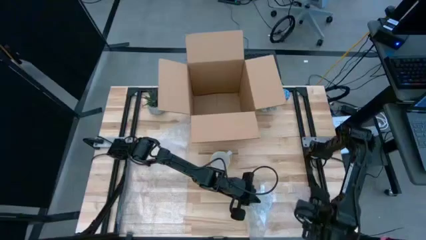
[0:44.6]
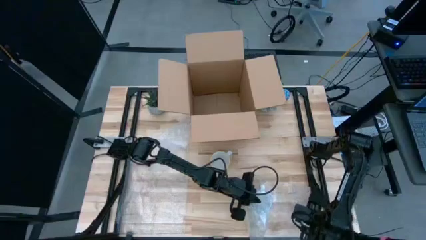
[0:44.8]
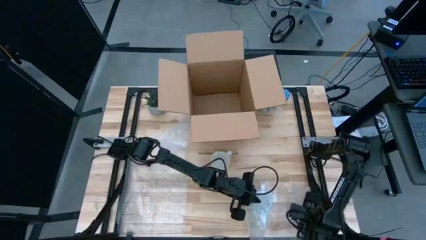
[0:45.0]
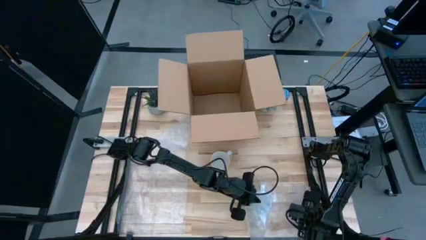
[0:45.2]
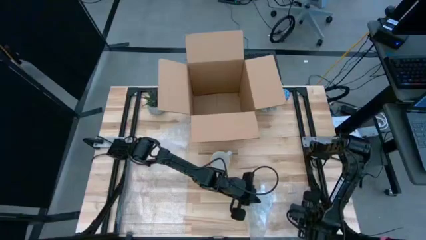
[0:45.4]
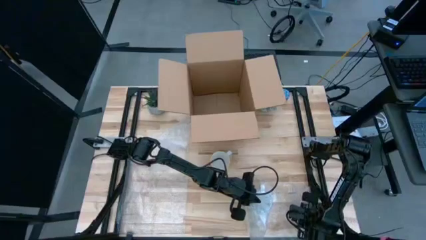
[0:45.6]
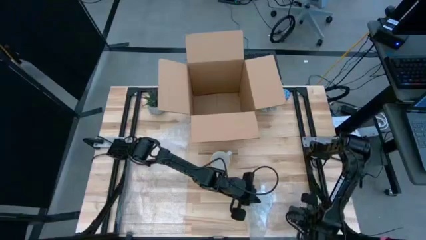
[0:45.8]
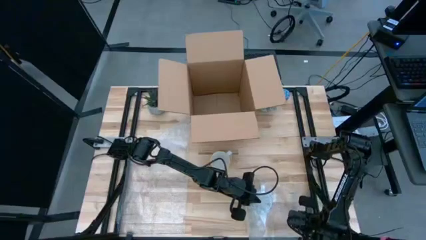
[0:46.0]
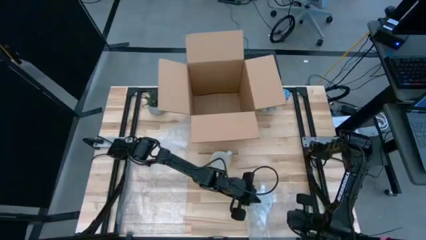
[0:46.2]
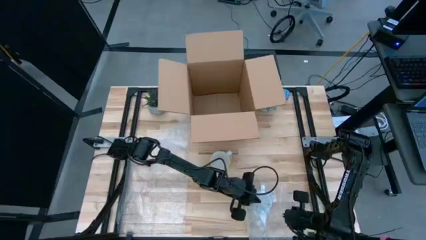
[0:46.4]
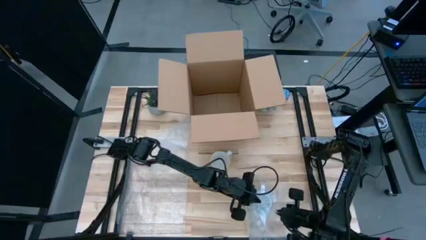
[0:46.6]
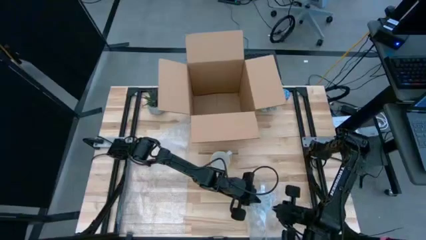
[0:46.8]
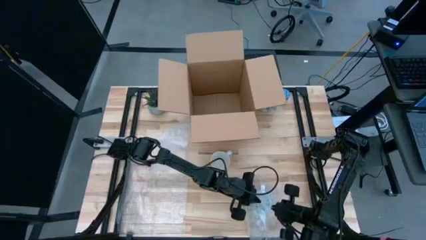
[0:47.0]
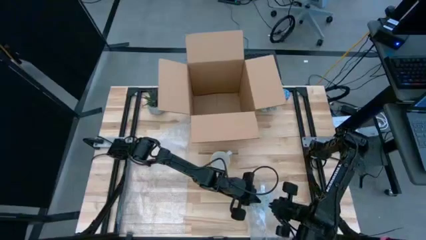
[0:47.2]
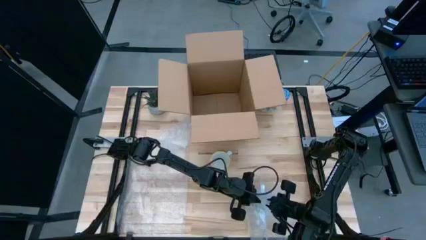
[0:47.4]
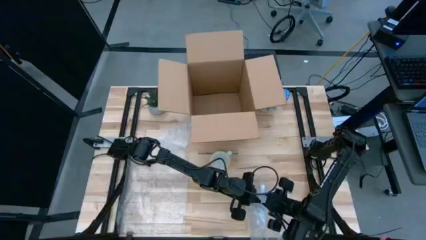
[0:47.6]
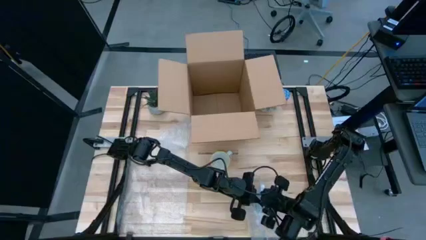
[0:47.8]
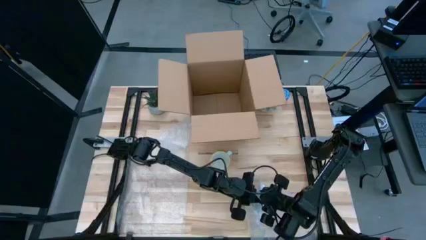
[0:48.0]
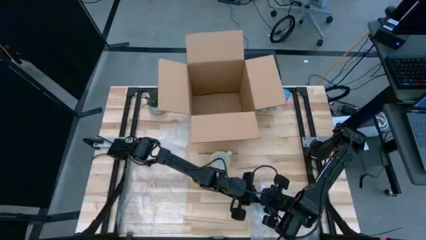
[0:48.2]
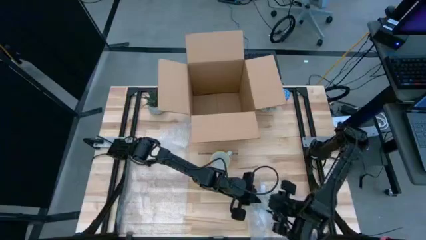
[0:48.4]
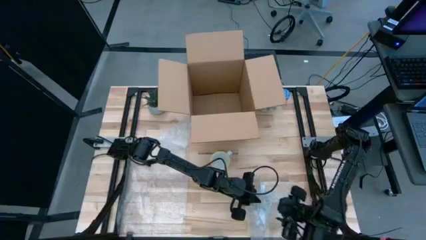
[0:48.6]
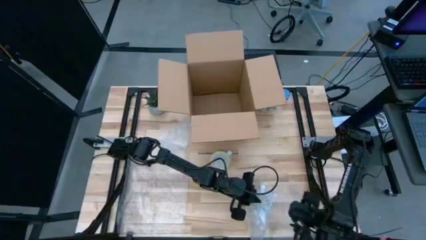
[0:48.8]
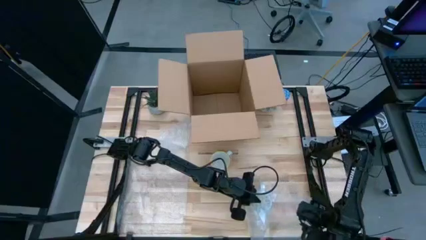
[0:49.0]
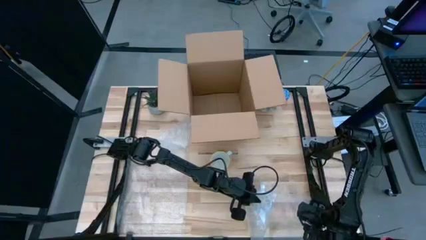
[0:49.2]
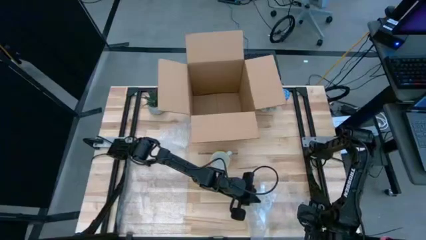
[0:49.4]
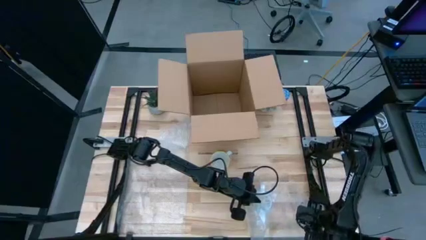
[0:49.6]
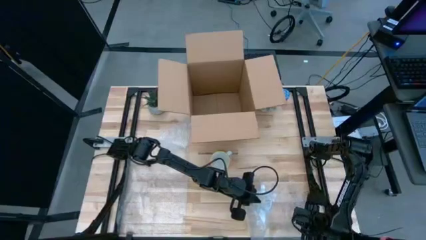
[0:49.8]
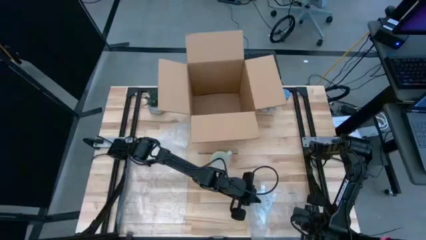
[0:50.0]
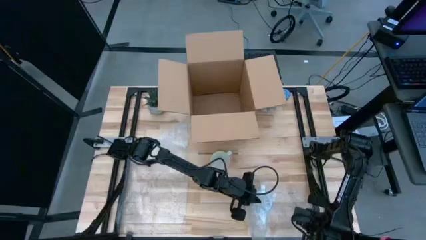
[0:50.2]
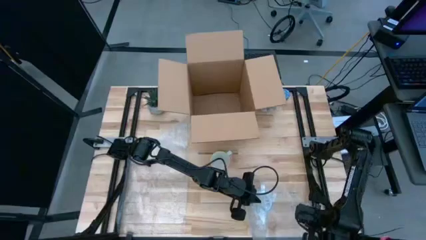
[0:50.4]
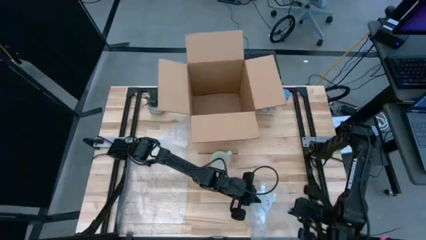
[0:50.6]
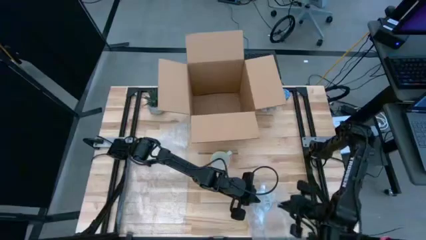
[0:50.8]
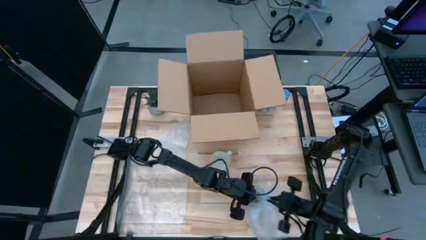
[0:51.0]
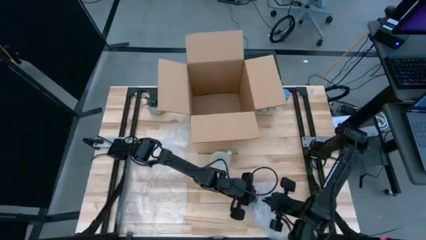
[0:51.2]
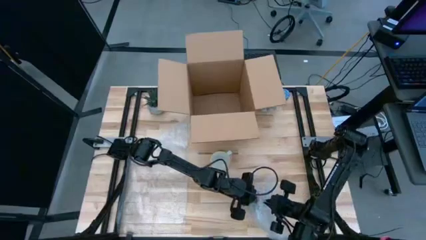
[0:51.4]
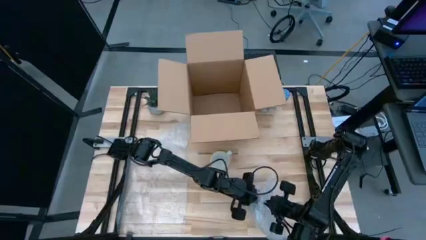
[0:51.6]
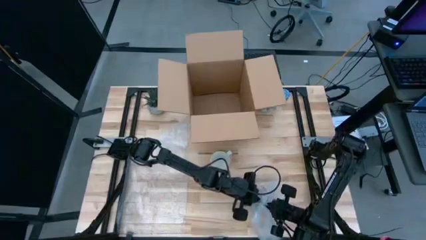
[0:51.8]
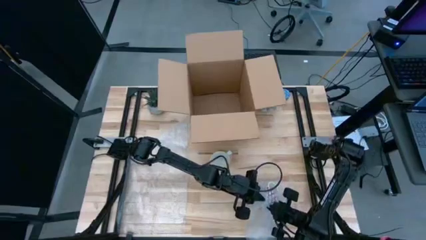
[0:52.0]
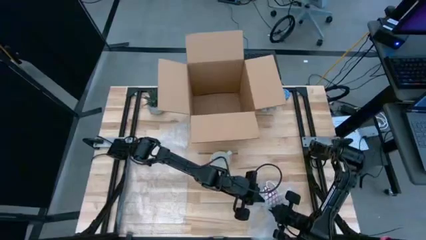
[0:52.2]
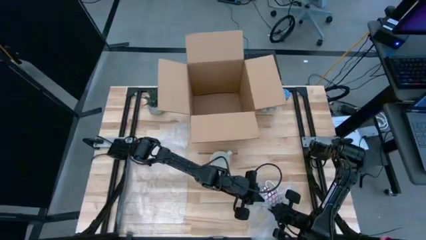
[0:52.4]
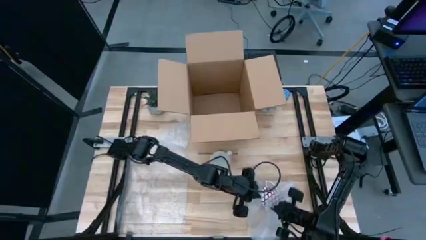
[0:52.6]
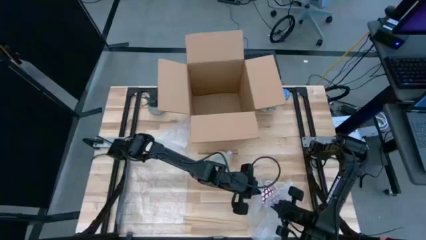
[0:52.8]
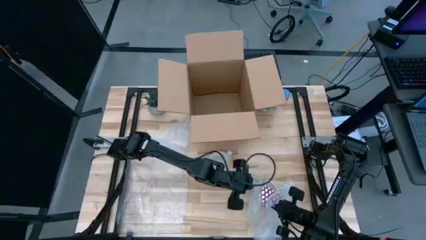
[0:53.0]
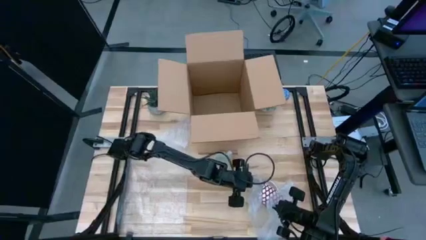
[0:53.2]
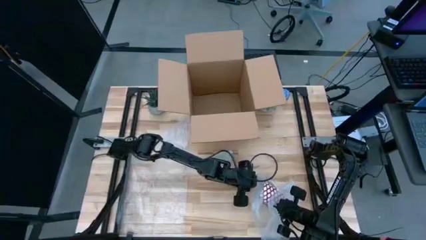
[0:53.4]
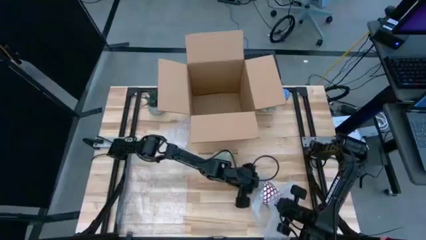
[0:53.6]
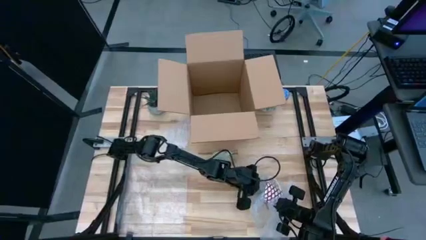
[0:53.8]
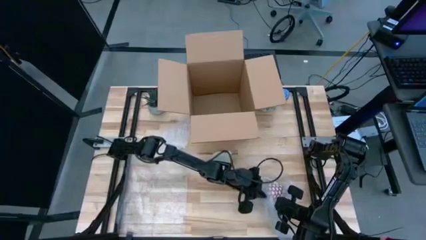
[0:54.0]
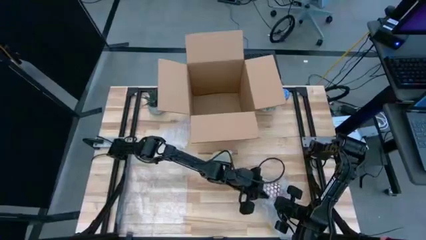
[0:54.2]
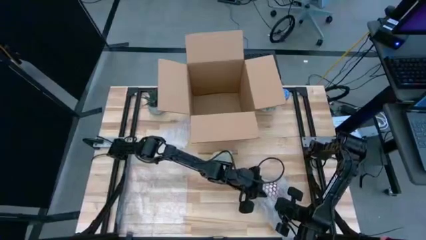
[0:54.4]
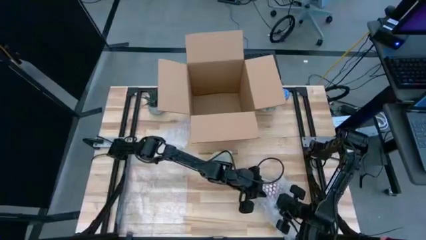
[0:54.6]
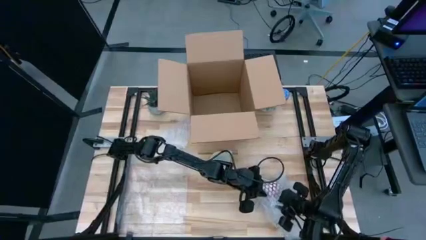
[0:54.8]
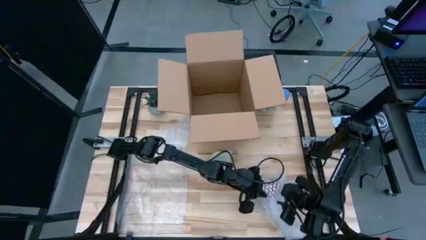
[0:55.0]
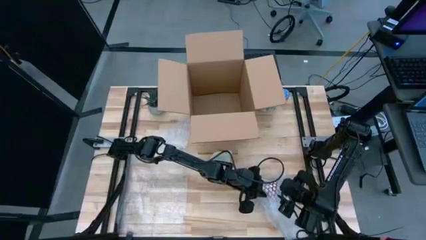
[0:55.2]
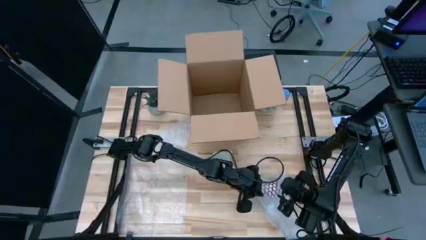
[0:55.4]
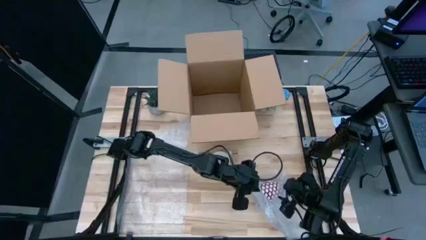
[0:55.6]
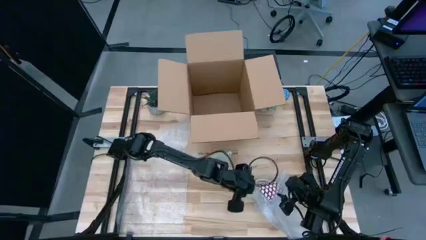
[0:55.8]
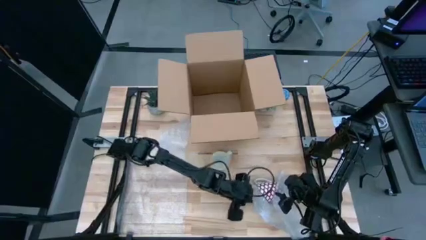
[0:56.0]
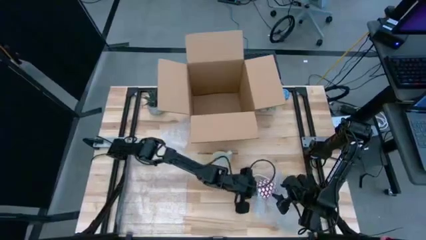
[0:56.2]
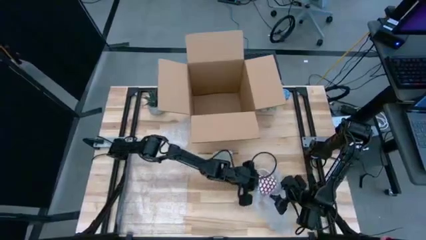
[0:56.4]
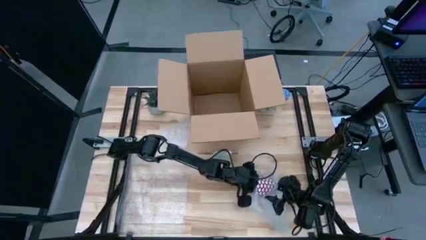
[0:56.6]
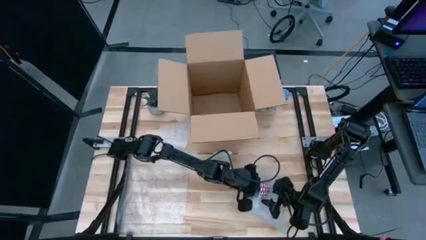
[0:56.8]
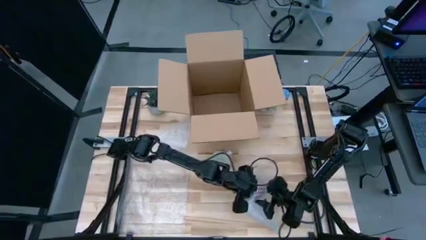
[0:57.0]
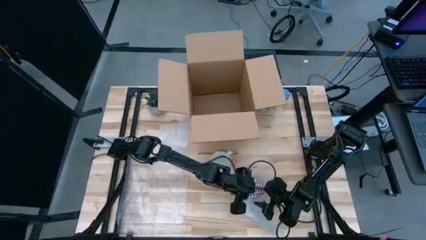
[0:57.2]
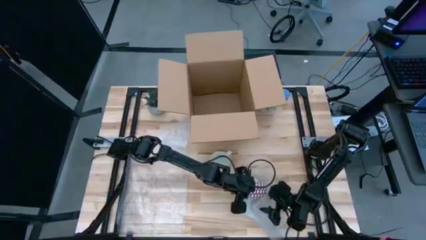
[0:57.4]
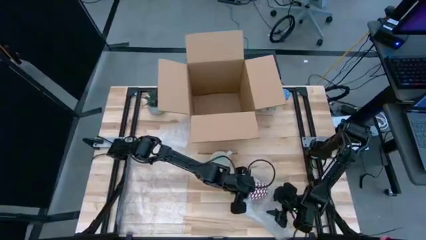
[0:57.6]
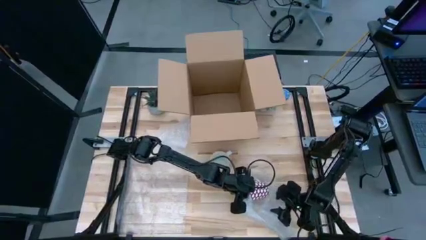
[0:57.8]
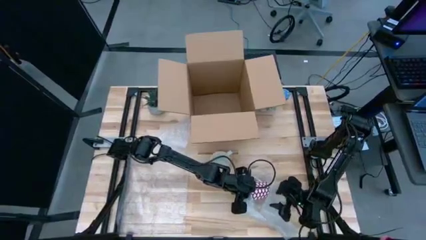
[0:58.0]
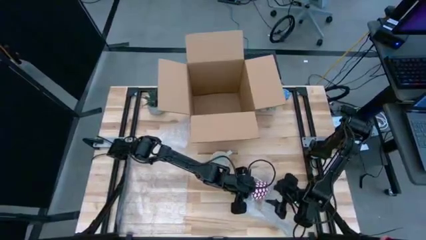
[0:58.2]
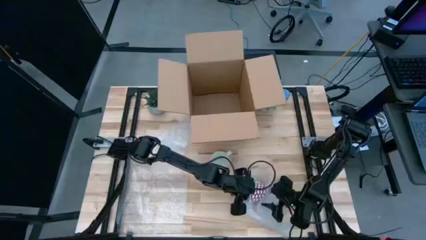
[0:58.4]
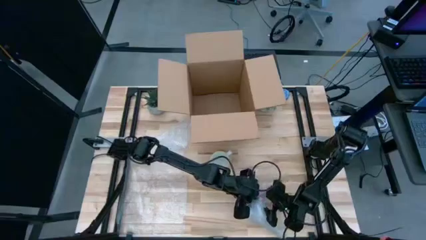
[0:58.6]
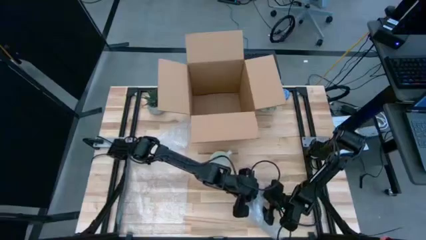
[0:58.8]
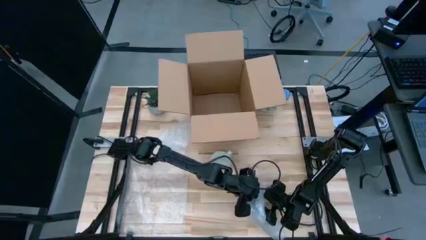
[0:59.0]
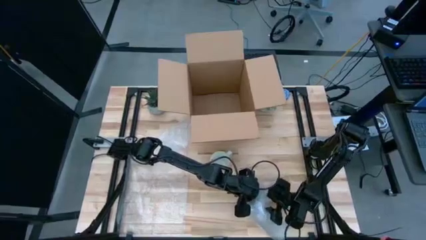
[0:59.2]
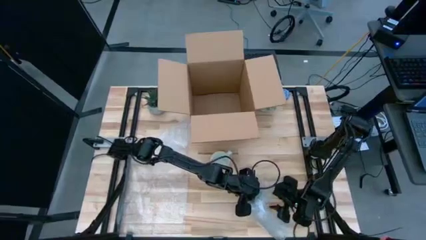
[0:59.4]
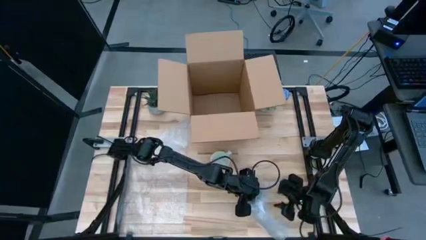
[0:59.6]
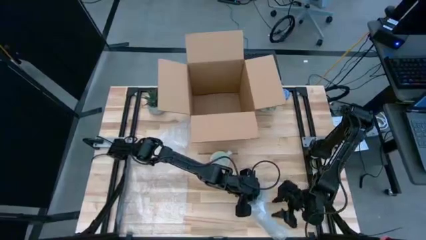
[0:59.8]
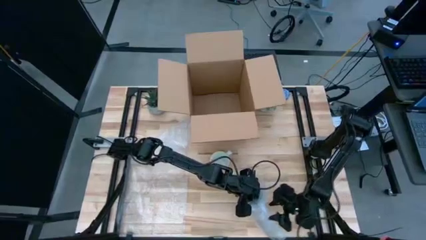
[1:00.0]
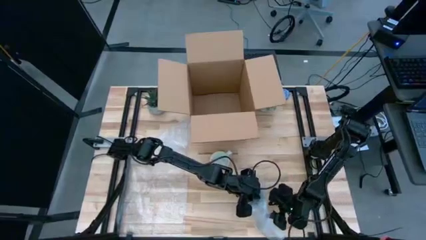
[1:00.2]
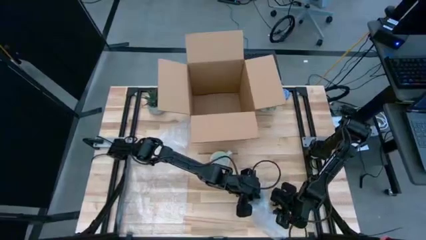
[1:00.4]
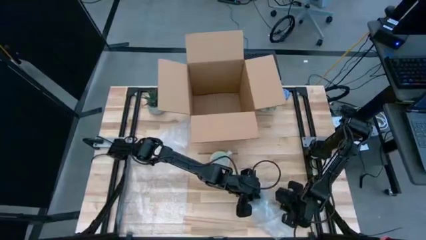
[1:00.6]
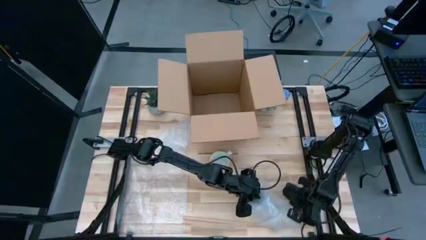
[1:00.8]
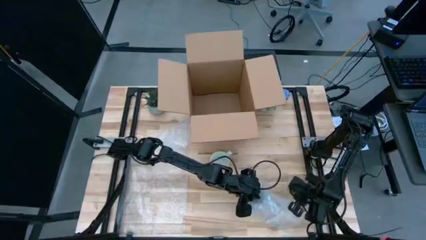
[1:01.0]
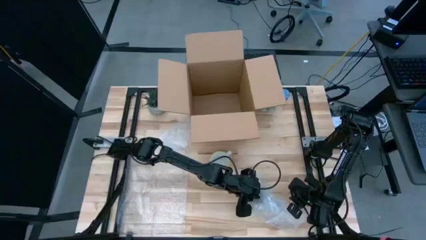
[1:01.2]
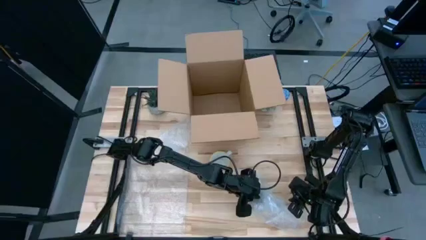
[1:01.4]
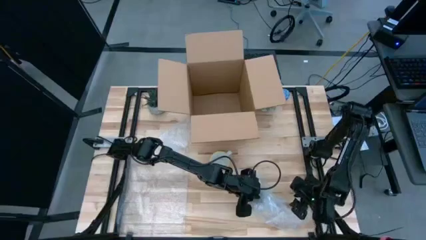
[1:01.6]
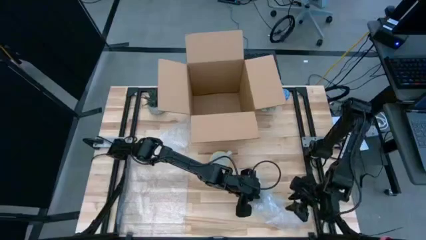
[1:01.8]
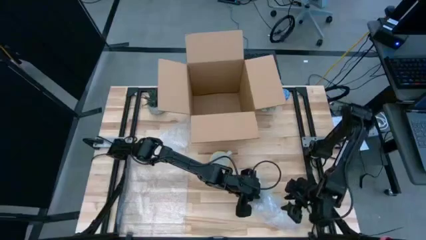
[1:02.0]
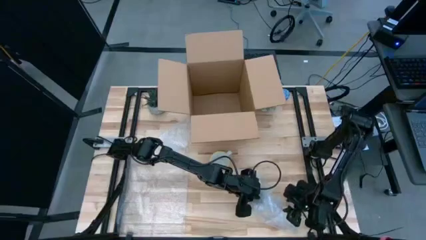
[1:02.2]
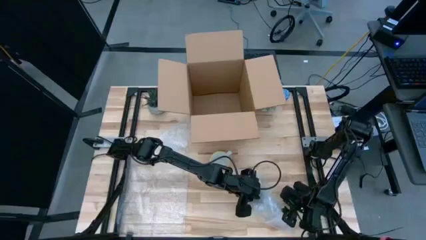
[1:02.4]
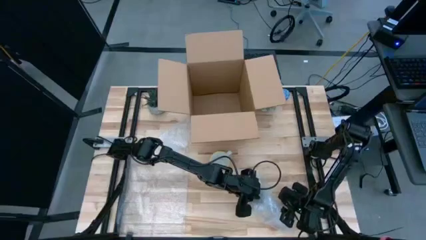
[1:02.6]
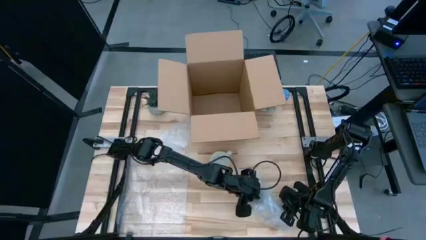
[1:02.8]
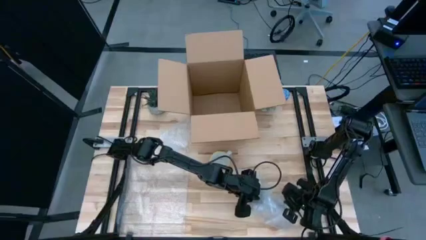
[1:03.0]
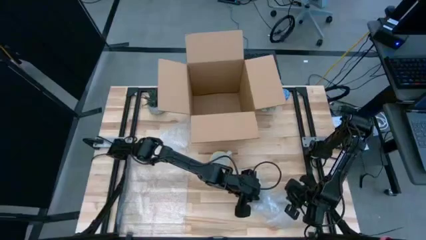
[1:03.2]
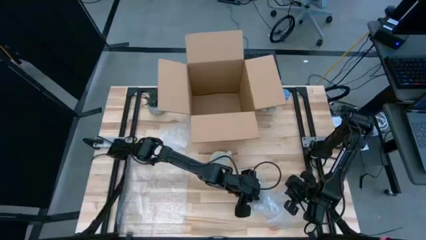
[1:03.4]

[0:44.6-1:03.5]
Task: wrap mug
Wrap the red mug with bubble wrap
